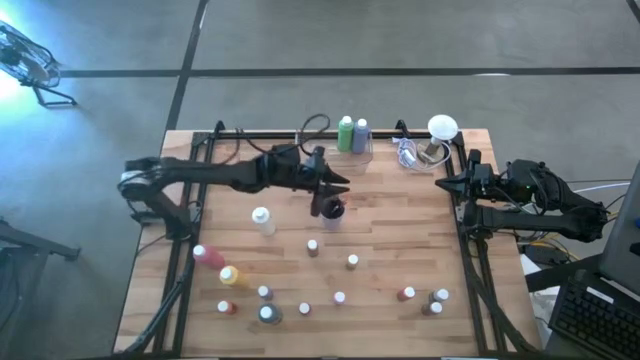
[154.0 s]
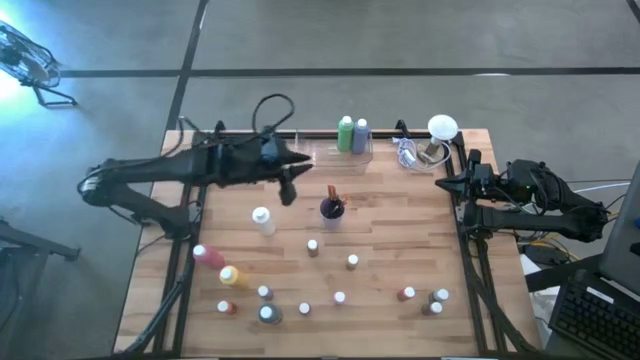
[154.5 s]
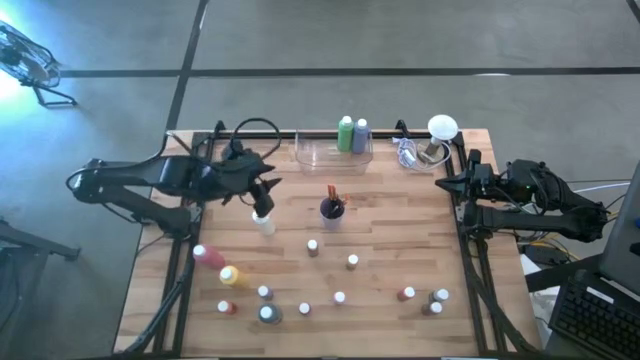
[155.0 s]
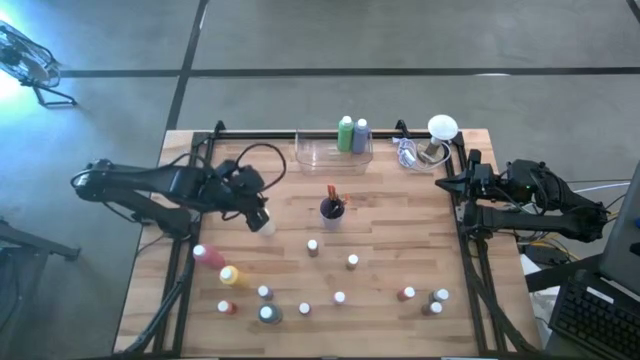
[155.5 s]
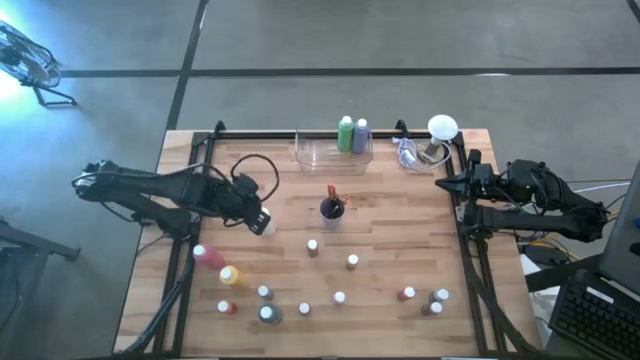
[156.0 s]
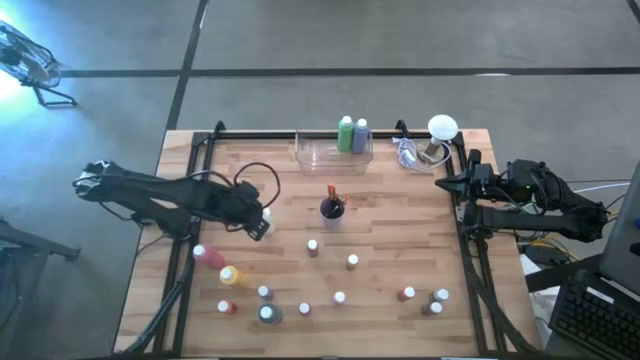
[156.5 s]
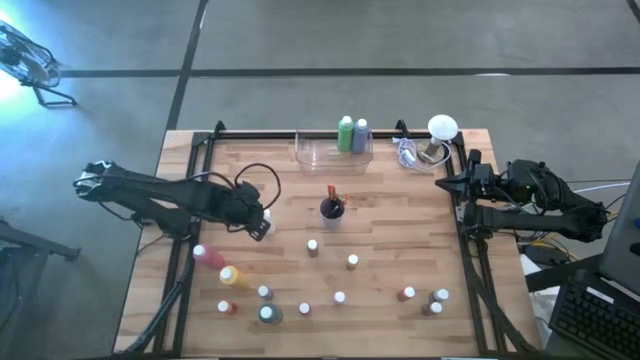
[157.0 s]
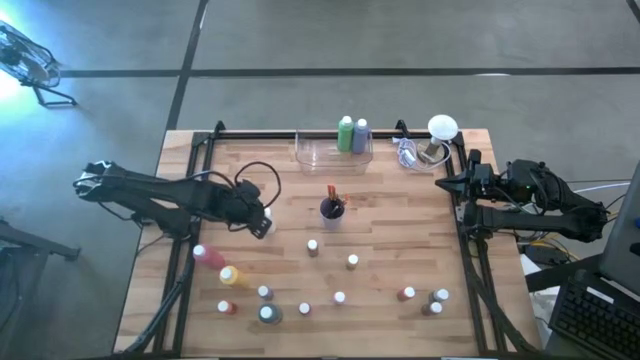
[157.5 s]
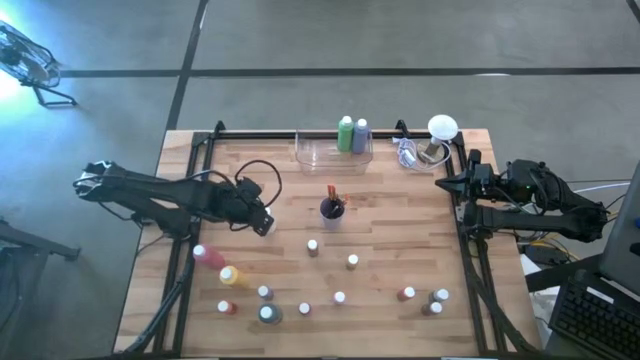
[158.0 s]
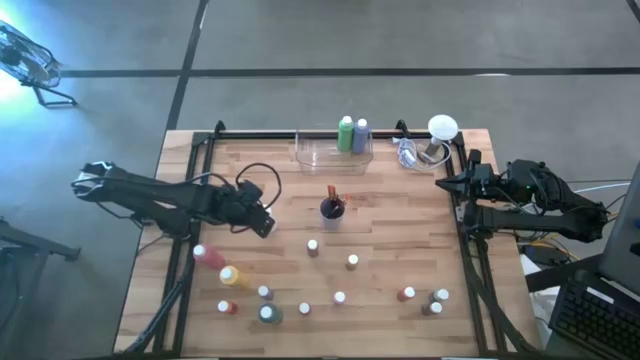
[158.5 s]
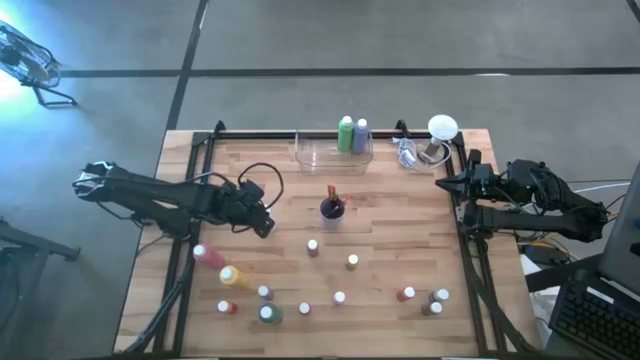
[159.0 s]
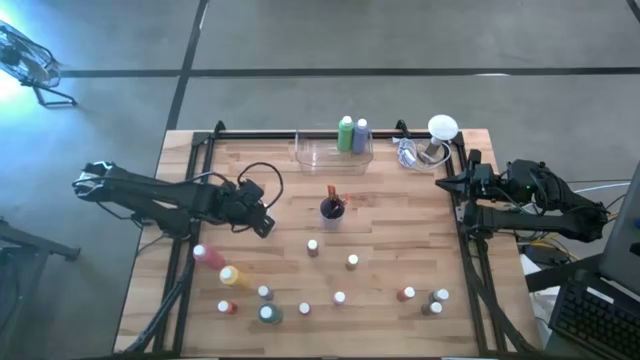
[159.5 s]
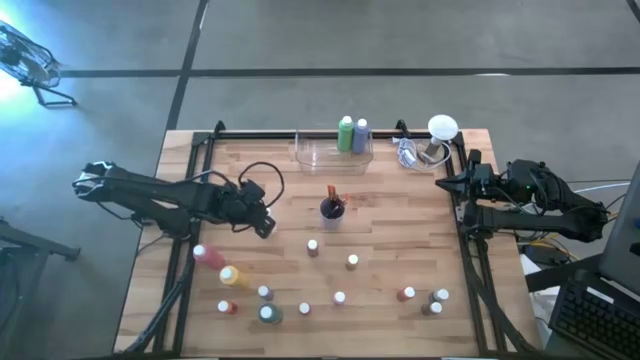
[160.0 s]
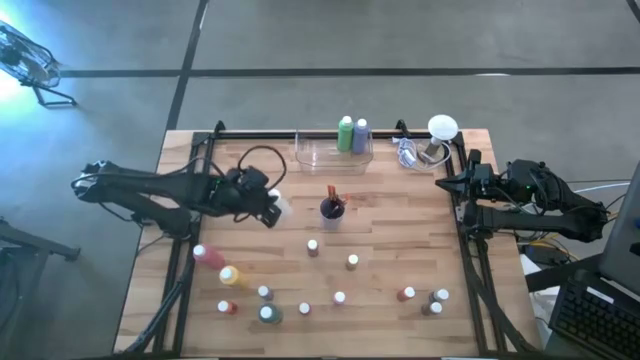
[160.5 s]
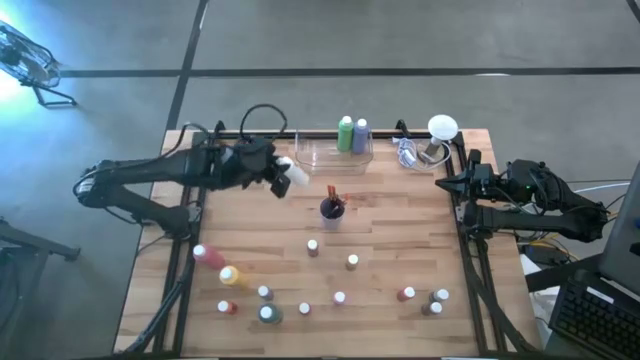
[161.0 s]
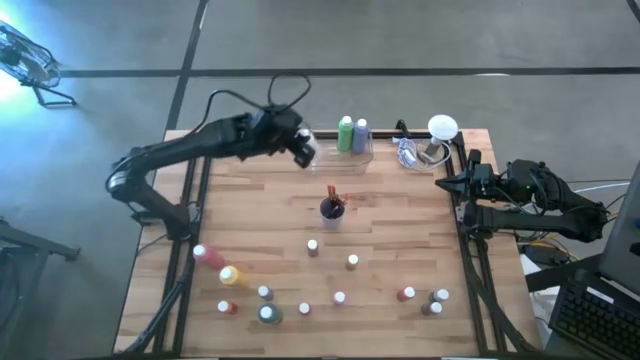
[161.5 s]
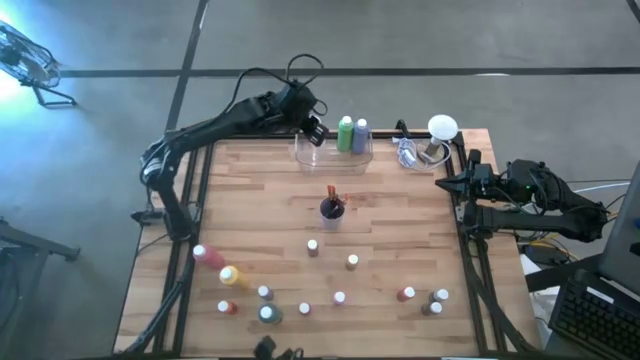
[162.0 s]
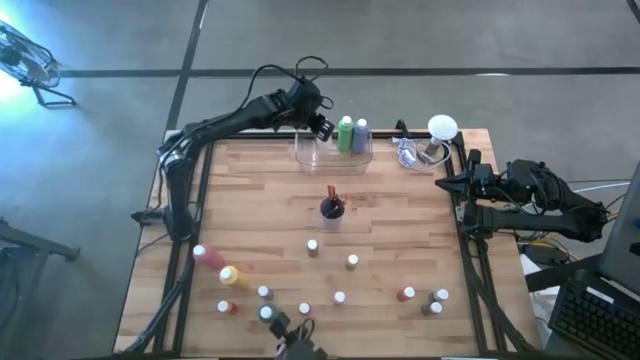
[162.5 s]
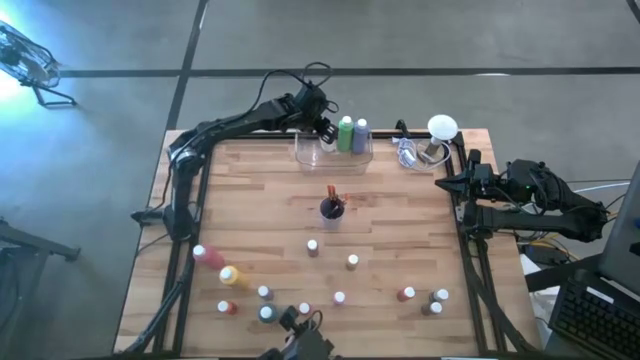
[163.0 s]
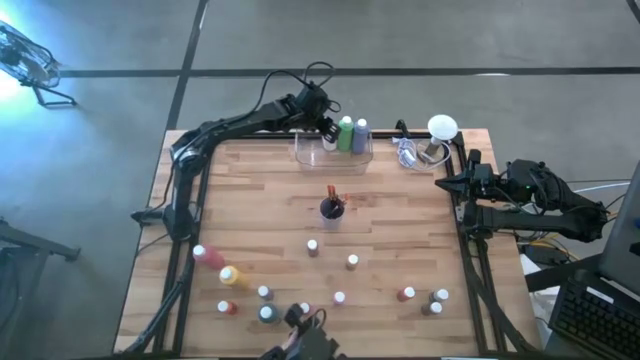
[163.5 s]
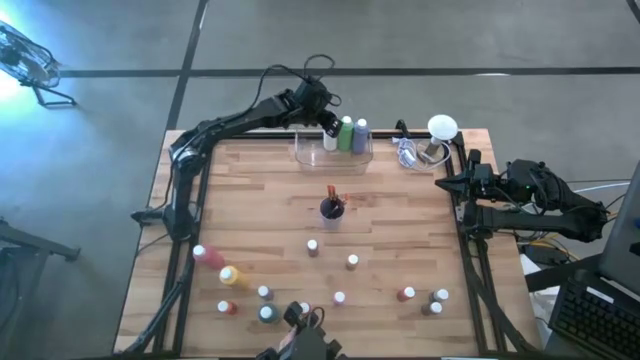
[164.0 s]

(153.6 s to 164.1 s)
Task: Pick & Place Paint Supplies
Put the white paint bottle into the transparent bin

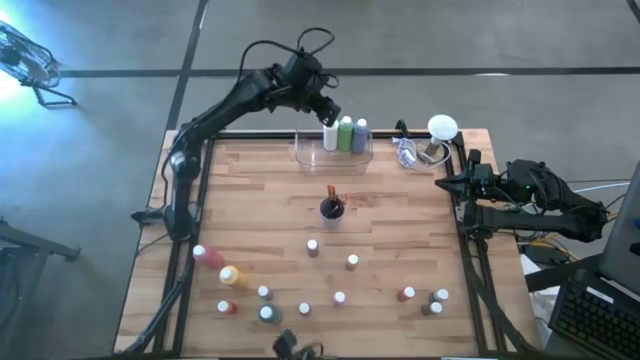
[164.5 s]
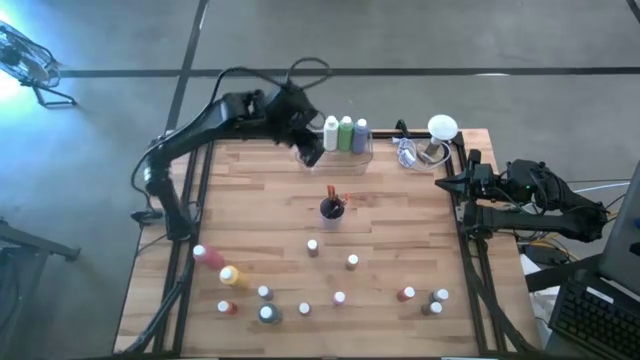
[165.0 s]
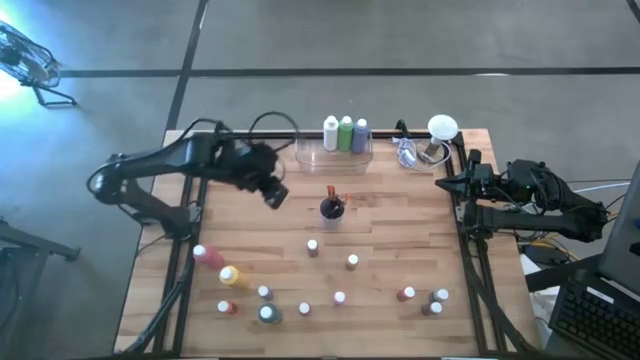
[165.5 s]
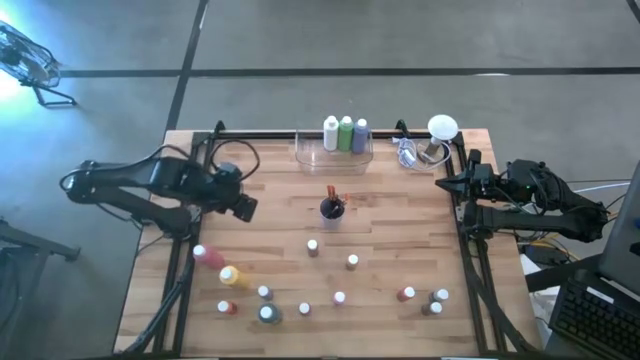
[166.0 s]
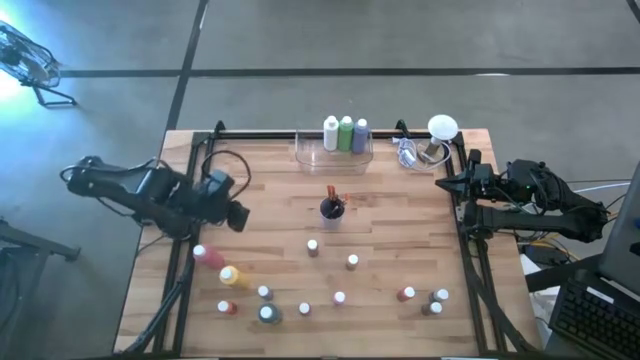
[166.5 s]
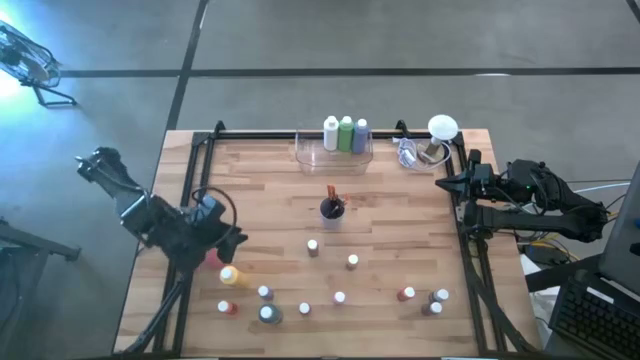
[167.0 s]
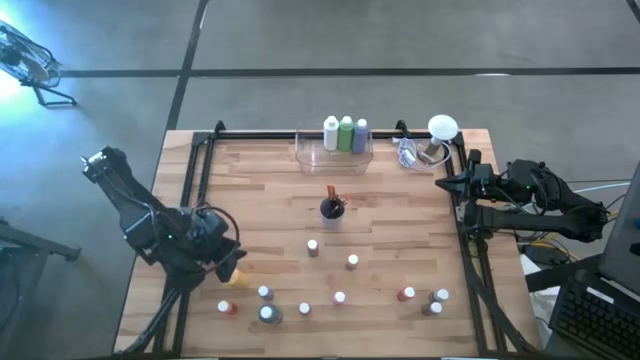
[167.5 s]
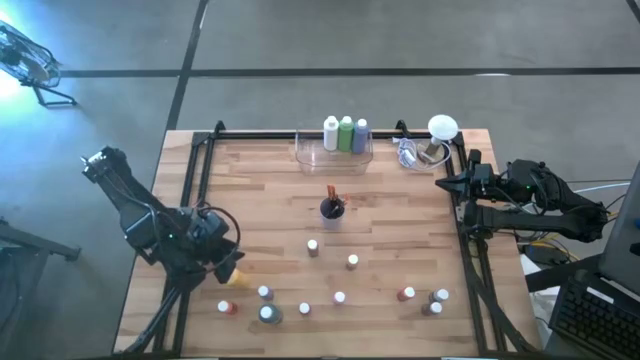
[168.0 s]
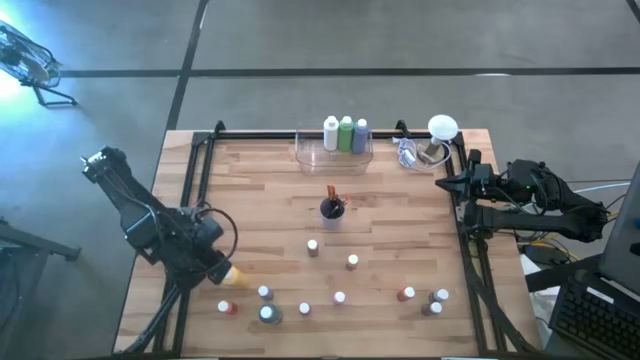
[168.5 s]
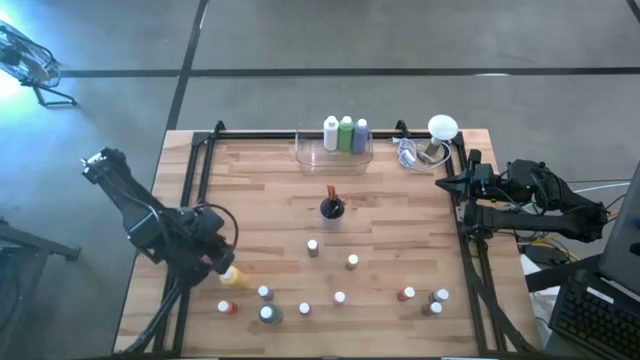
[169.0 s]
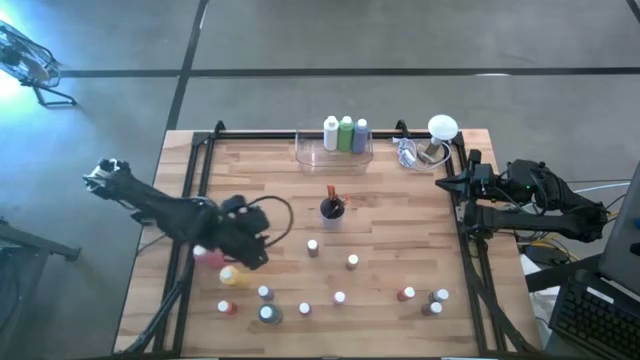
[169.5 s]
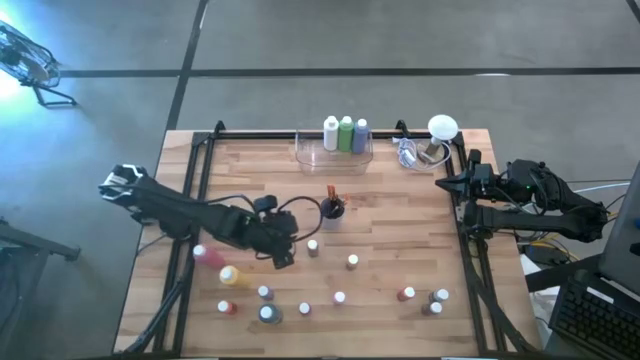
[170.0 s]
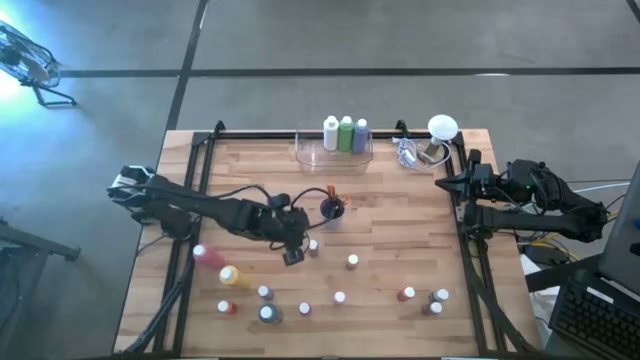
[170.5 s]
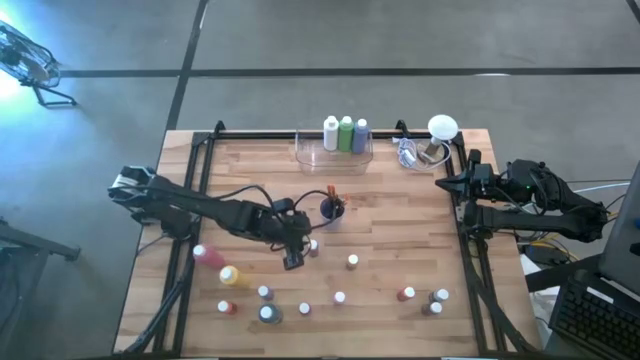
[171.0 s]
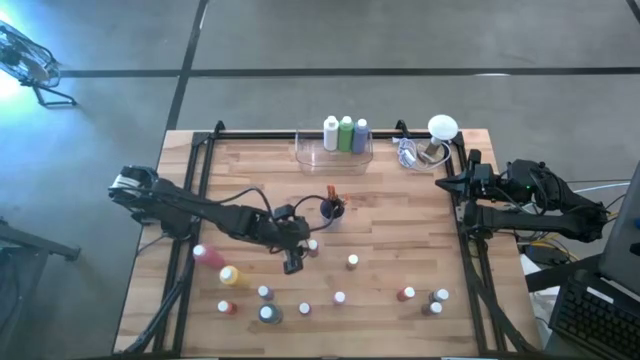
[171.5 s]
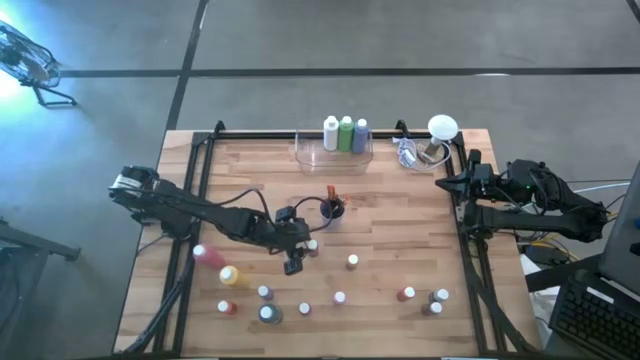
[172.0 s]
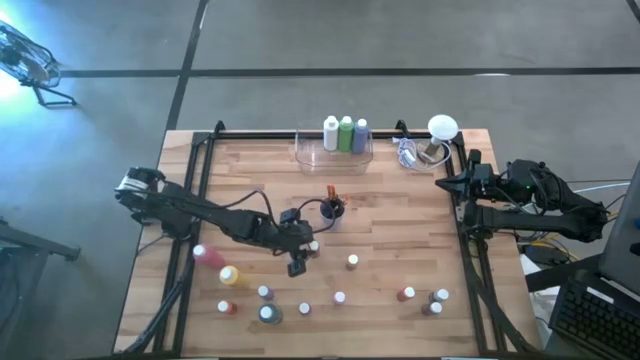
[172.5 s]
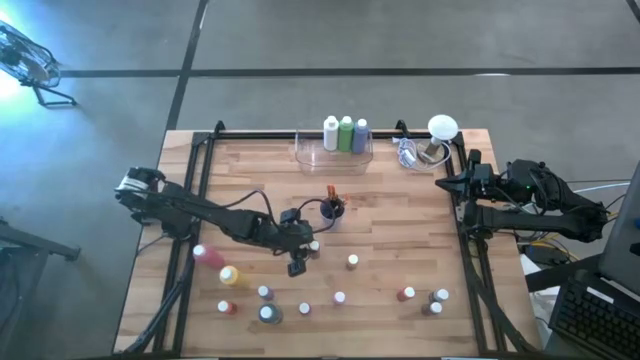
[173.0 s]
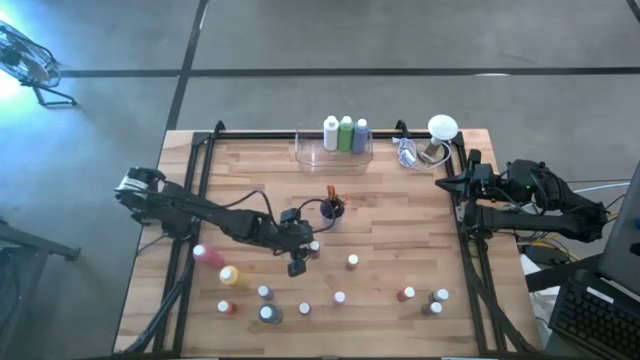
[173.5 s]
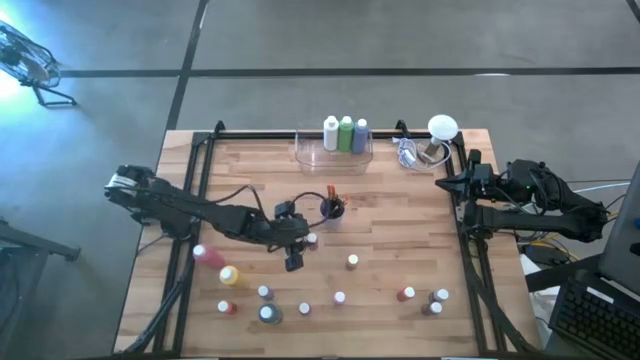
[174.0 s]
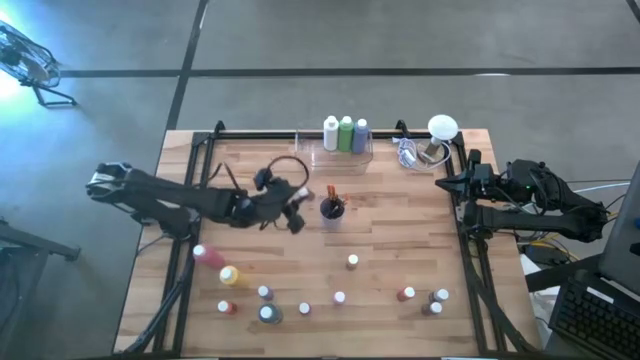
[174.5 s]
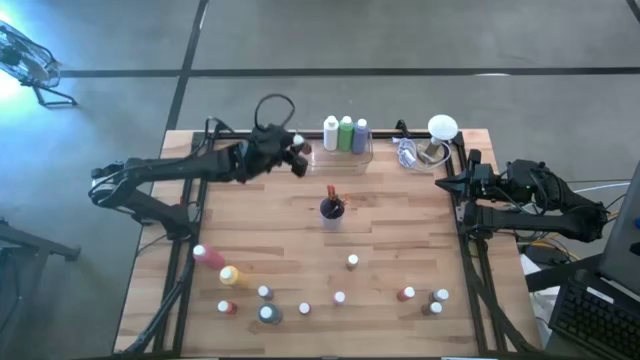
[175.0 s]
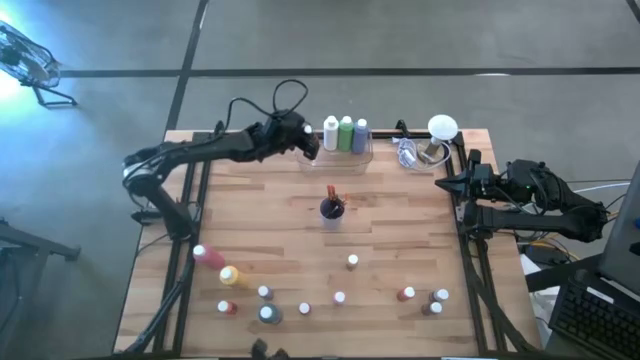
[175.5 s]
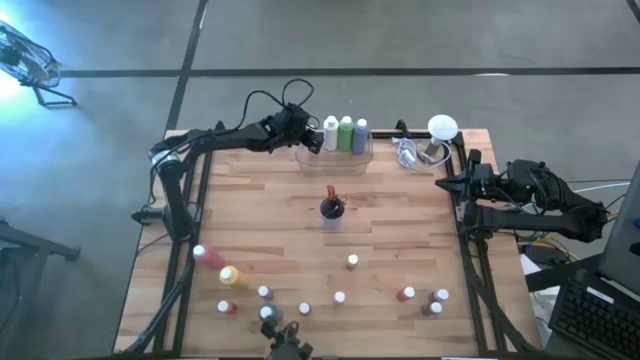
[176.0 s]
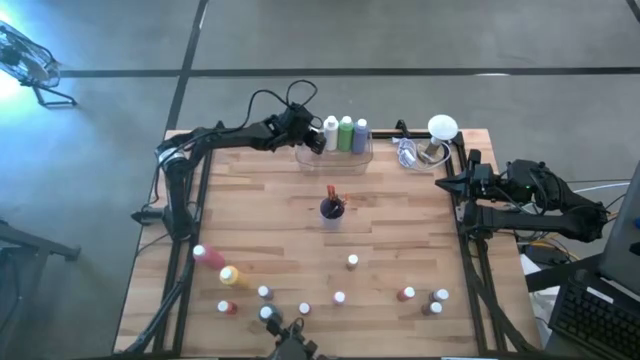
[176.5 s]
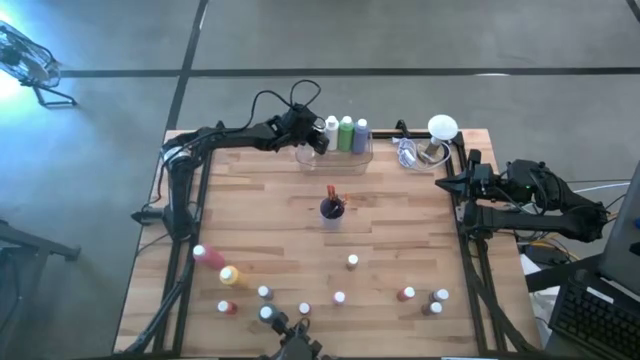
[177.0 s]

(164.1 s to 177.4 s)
Put the brown black paint bottle into the transparent bin
